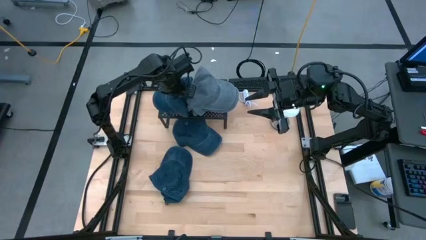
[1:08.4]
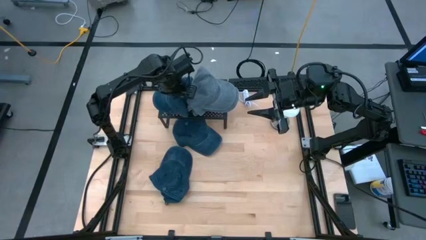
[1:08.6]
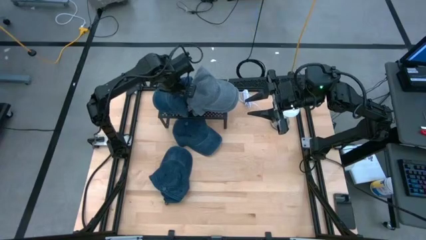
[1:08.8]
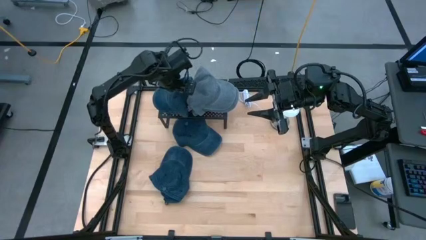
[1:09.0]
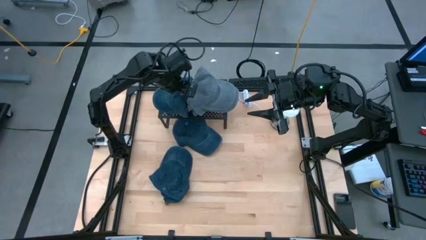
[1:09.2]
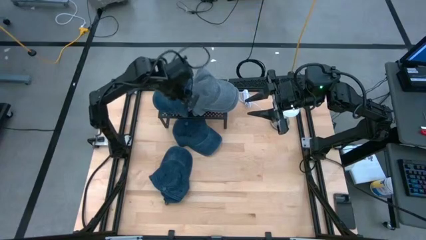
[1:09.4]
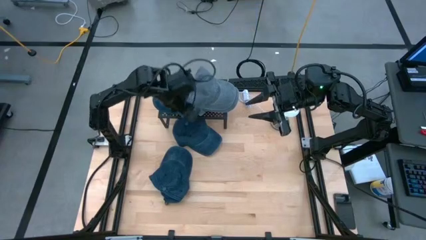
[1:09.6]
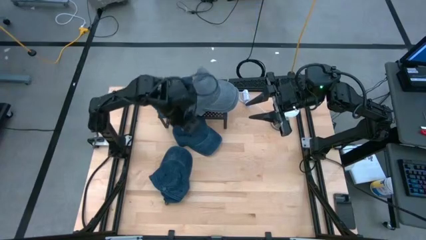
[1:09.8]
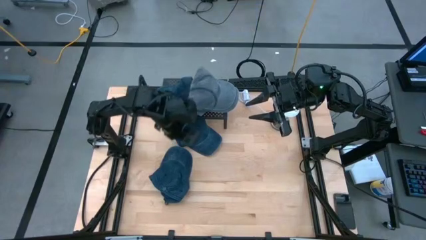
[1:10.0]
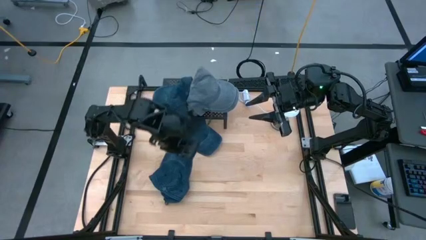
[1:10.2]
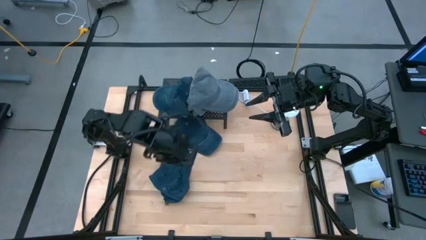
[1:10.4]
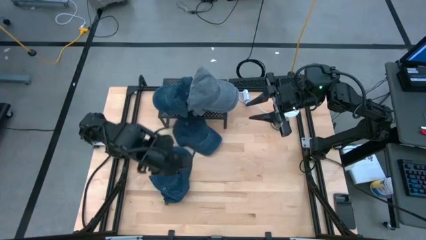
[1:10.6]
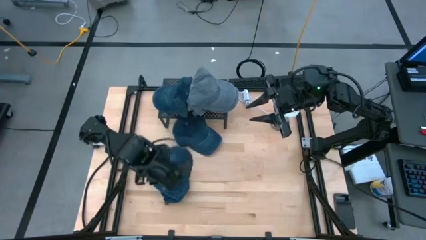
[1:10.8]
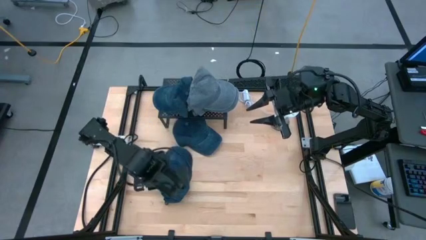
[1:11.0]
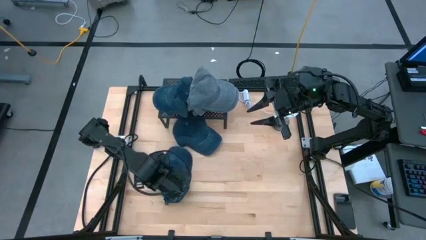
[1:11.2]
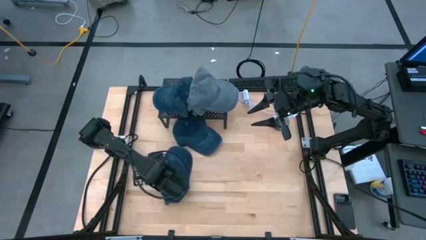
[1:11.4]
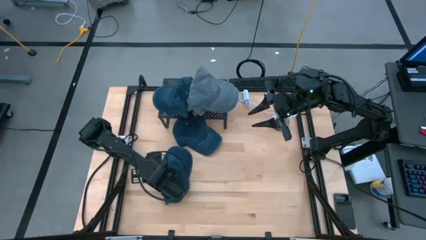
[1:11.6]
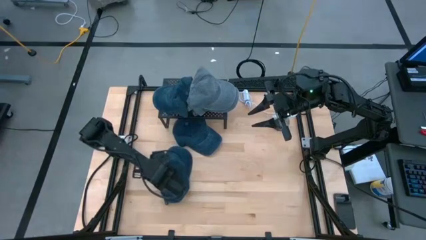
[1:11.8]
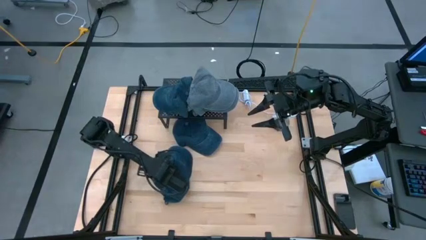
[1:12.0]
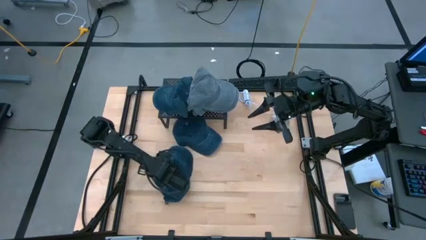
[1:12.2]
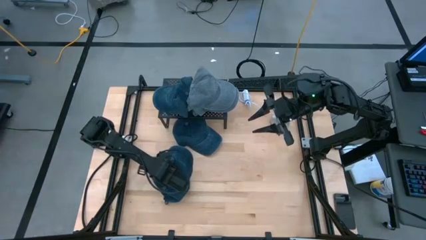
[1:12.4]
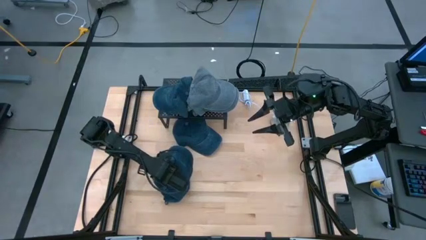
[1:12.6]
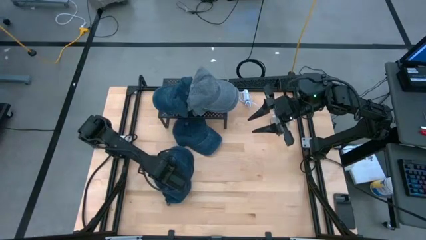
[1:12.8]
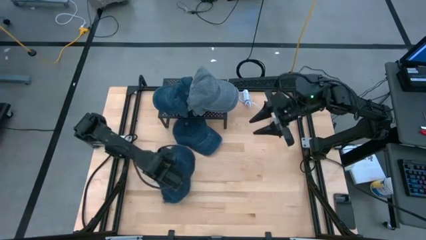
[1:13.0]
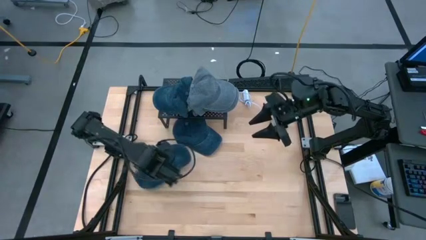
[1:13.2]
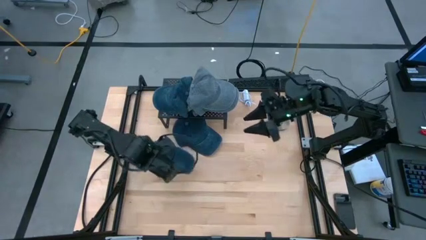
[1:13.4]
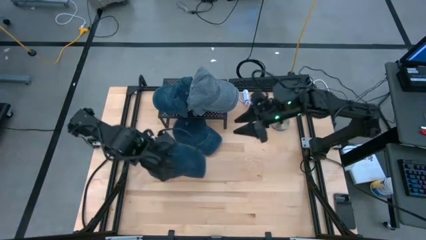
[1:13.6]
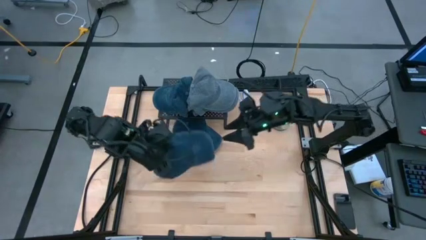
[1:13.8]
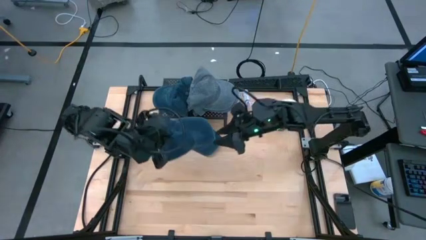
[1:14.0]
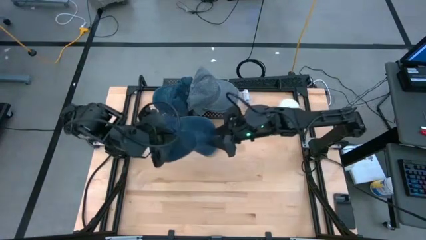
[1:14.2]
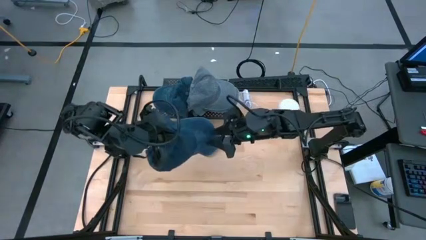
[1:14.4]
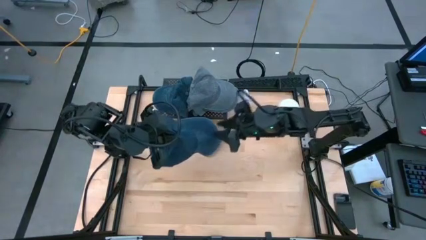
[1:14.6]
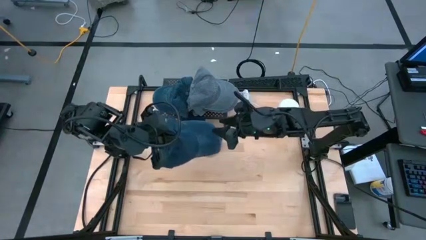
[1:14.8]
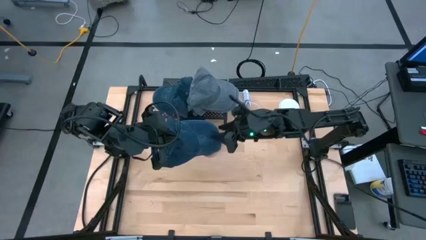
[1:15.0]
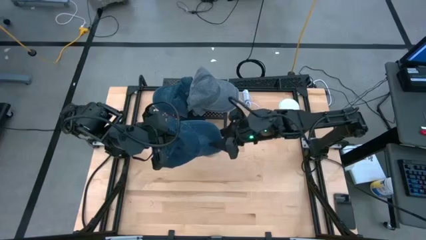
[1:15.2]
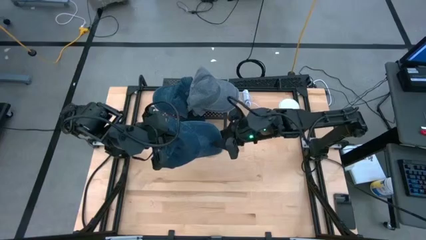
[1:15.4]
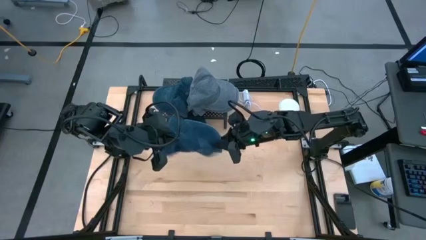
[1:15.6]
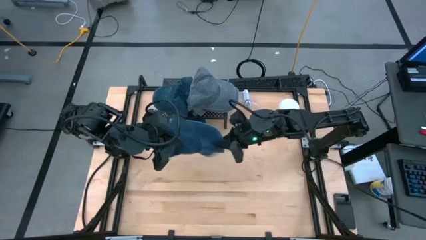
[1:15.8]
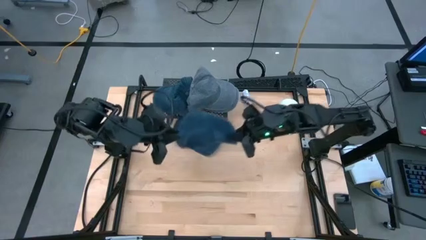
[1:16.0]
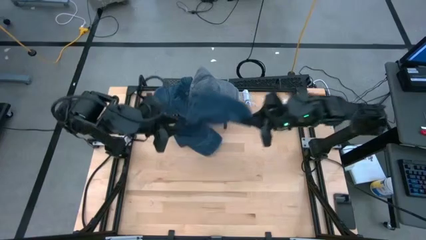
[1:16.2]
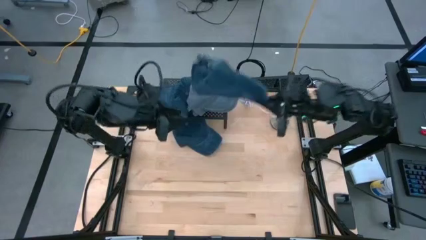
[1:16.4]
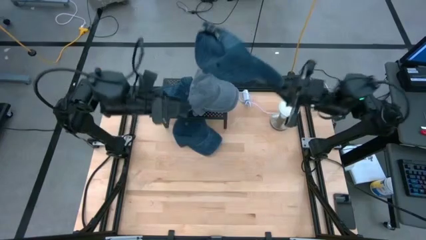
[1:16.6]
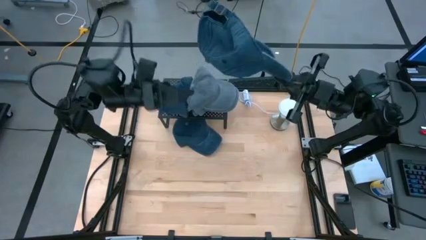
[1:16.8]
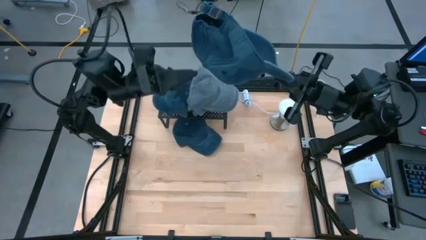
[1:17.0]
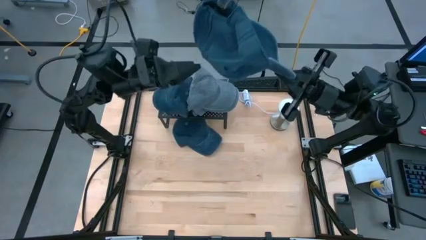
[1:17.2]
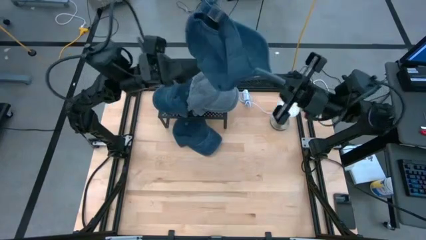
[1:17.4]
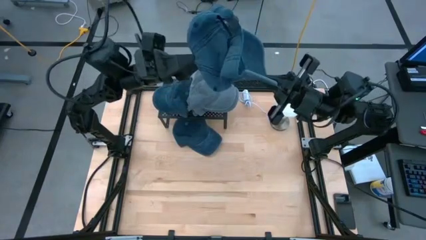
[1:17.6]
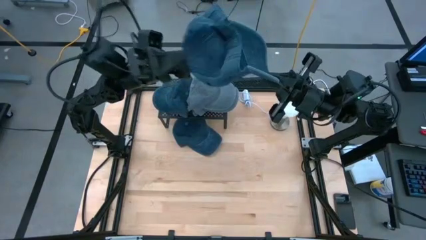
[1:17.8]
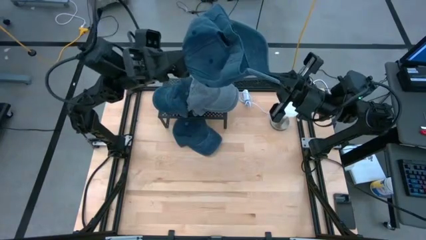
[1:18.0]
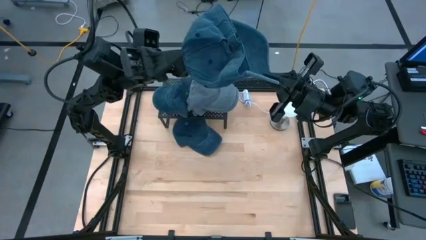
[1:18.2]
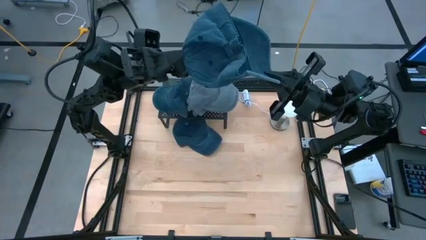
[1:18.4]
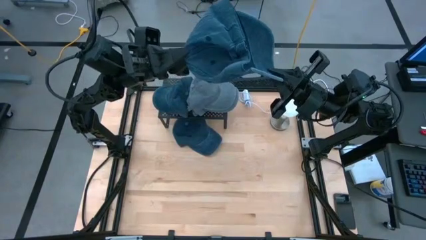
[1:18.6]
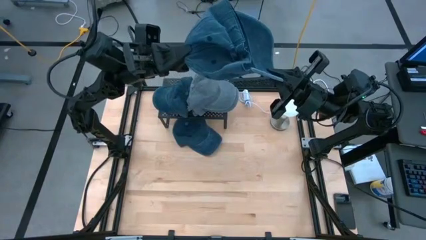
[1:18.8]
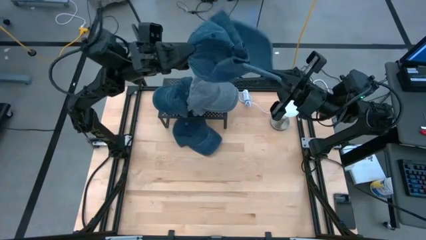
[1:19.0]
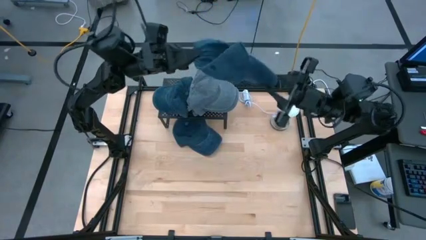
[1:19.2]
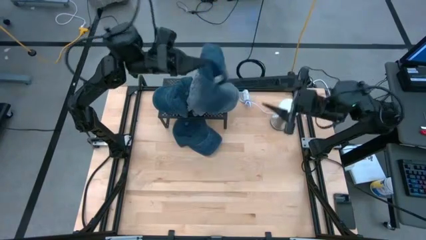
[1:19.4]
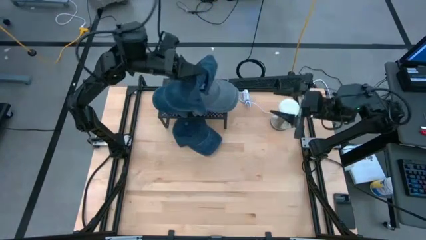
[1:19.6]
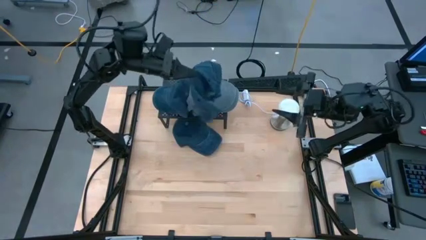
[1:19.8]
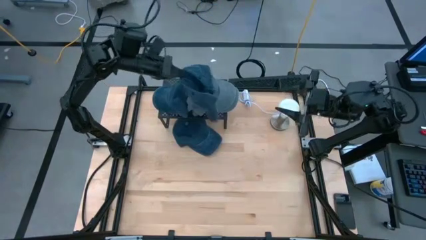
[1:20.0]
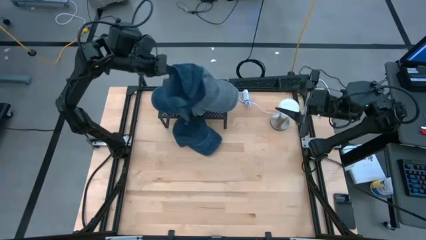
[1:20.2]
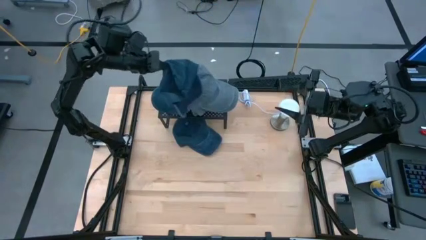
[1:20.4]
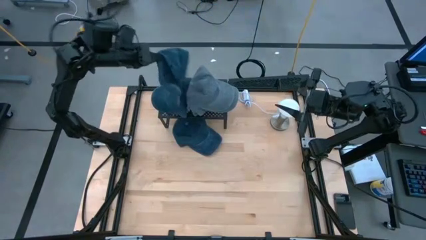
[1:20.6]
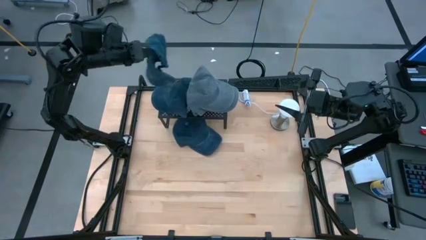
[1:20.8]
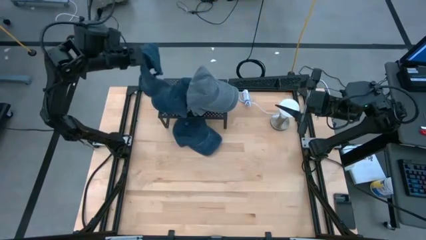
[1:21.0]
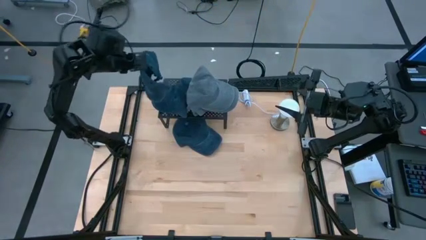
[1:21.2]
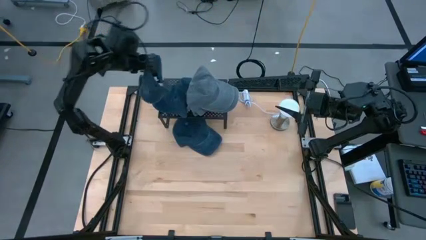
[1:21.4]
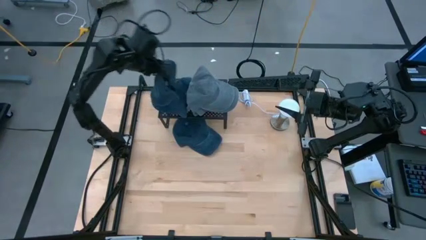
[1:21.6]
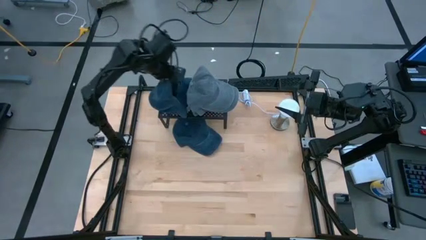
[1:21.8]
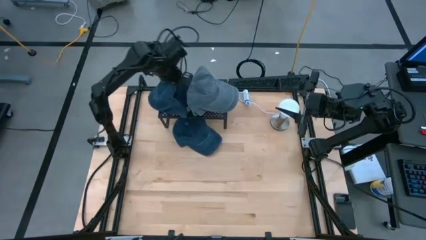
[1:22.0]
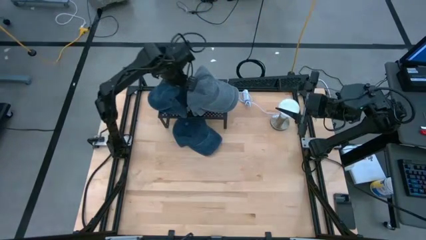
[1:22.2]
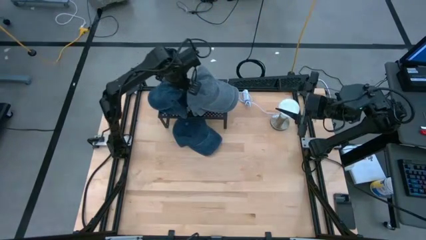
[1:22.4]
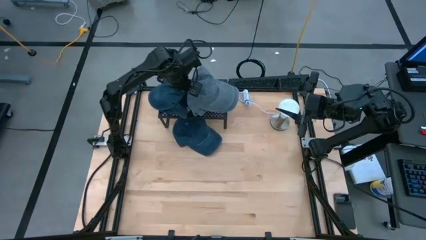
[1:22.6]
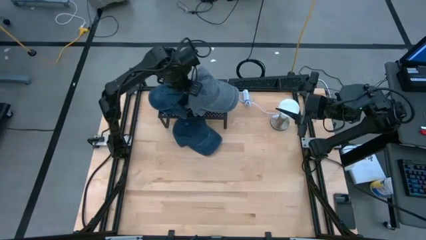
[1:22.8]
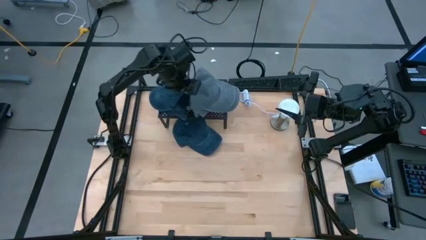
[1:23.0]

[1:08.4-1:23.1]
Task: Pick & Place hat
Stack the bottom dark blue cap on top of the other dark blue cap on the shelf
